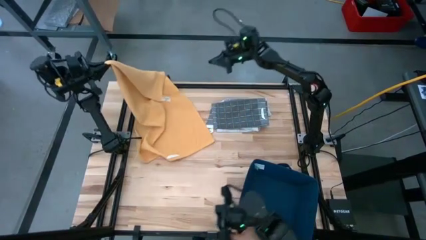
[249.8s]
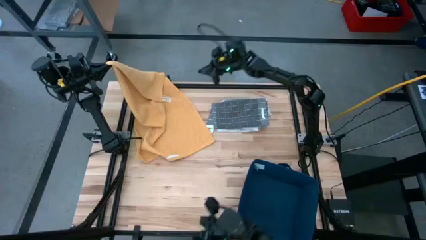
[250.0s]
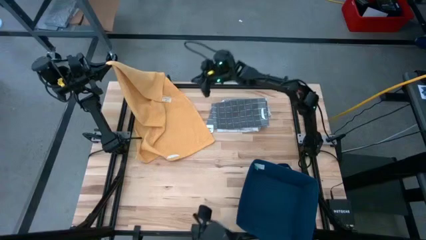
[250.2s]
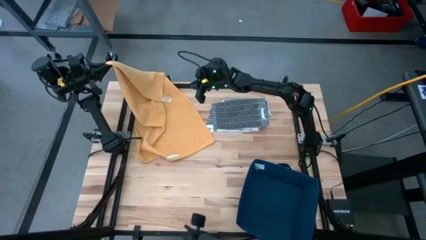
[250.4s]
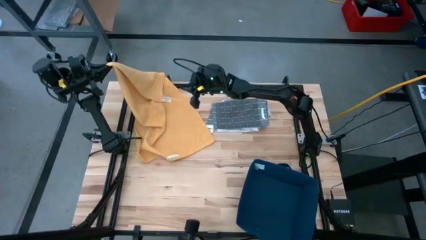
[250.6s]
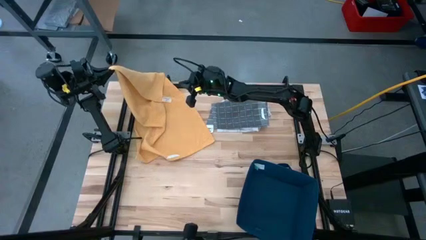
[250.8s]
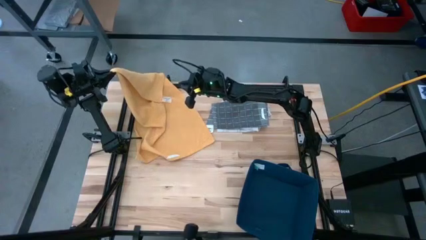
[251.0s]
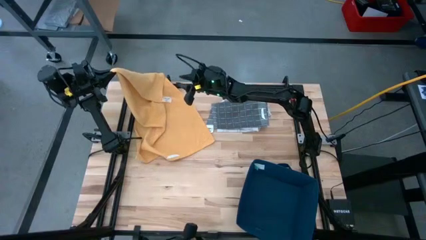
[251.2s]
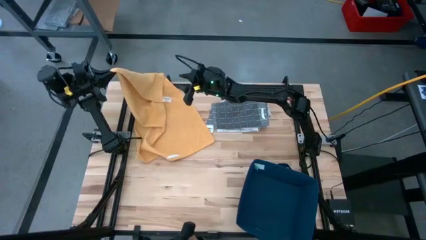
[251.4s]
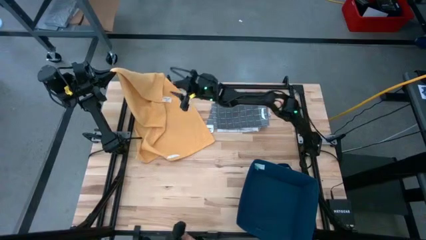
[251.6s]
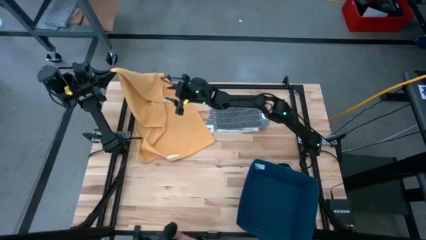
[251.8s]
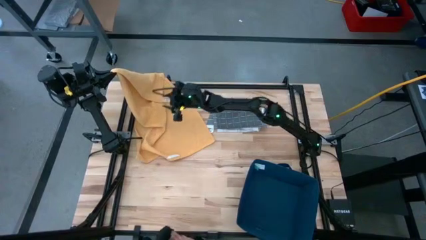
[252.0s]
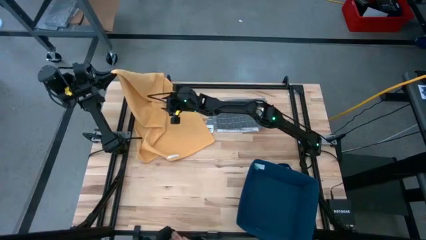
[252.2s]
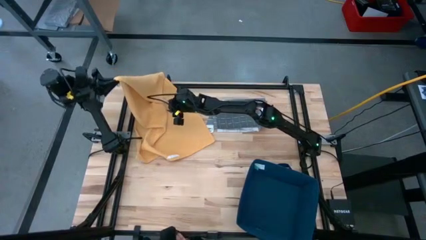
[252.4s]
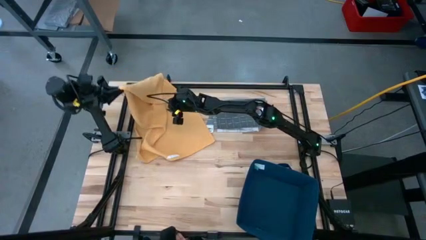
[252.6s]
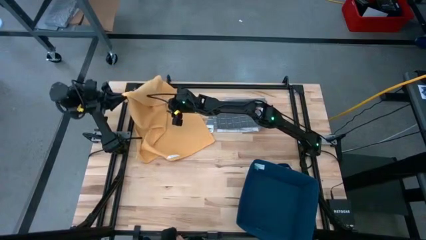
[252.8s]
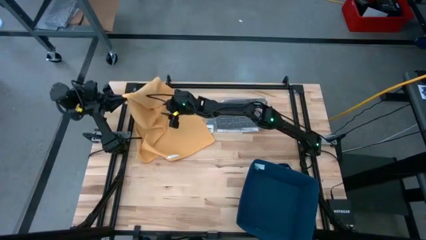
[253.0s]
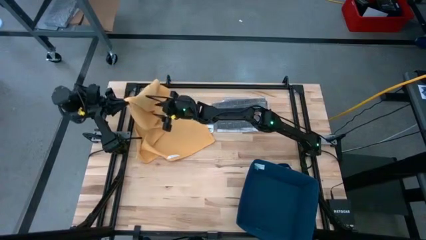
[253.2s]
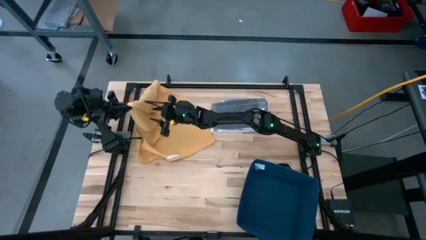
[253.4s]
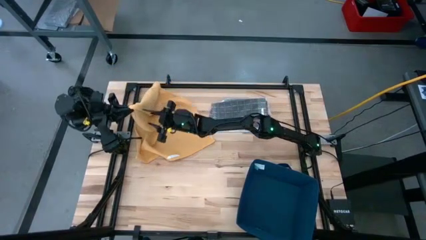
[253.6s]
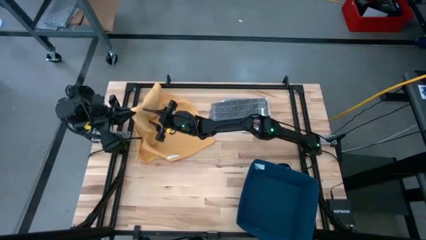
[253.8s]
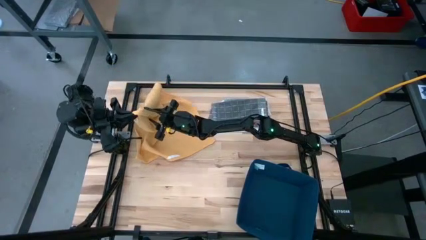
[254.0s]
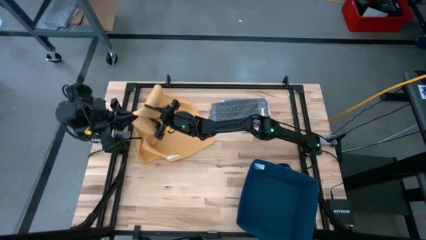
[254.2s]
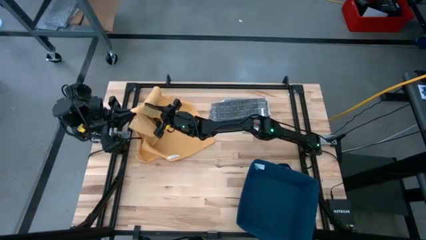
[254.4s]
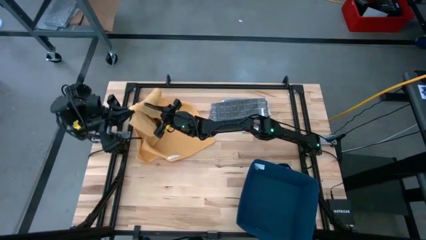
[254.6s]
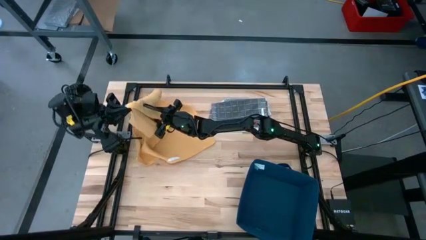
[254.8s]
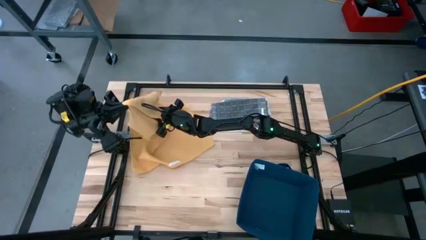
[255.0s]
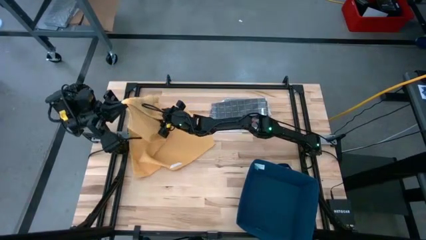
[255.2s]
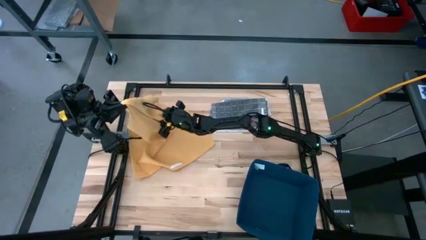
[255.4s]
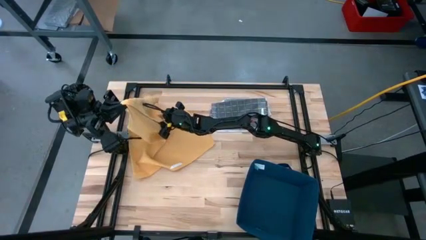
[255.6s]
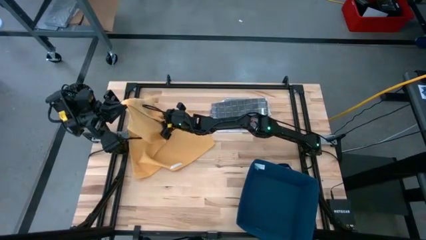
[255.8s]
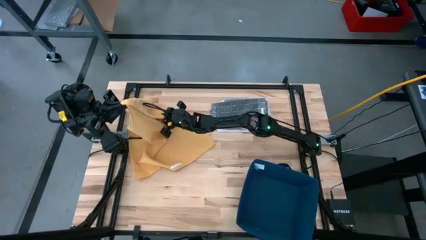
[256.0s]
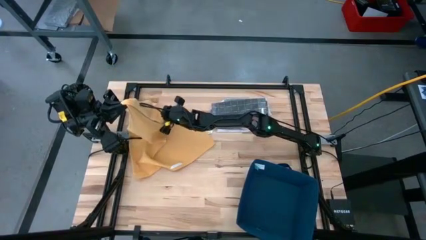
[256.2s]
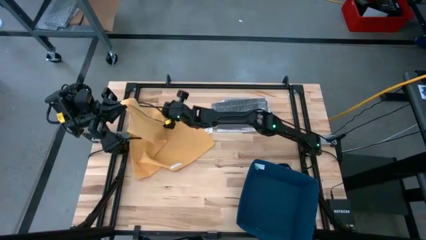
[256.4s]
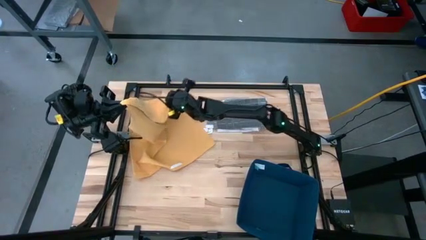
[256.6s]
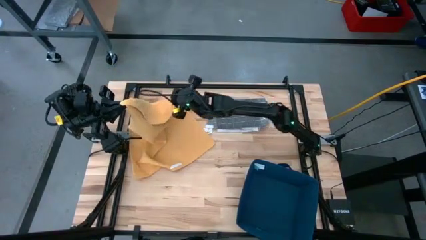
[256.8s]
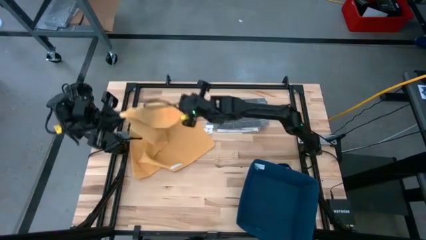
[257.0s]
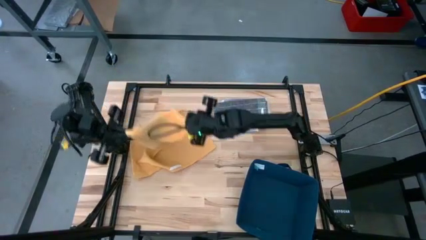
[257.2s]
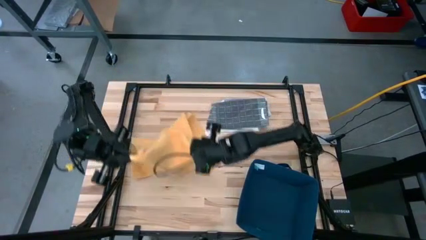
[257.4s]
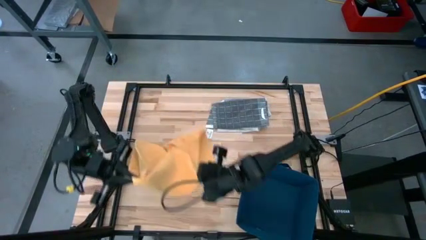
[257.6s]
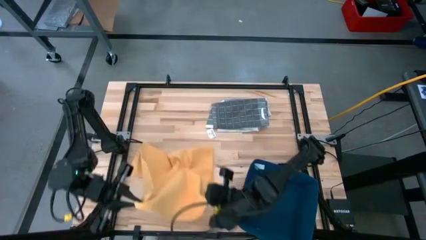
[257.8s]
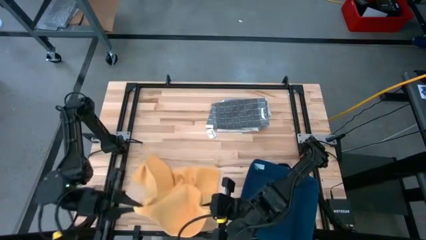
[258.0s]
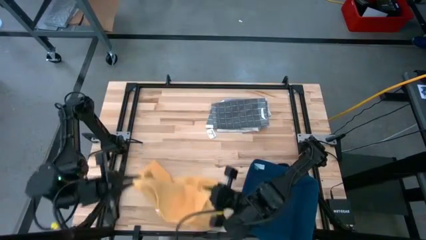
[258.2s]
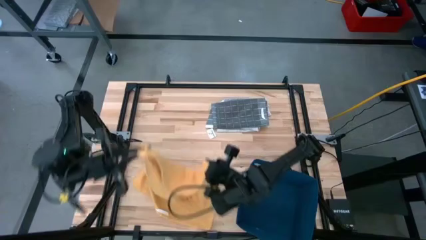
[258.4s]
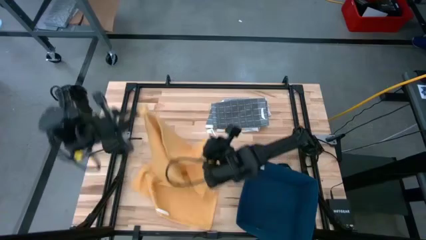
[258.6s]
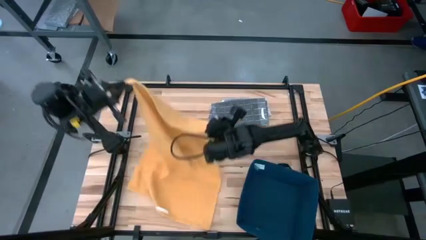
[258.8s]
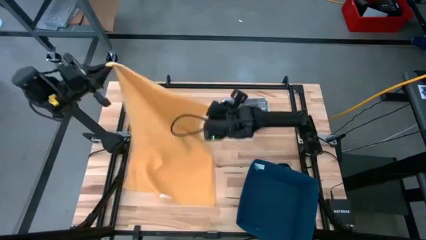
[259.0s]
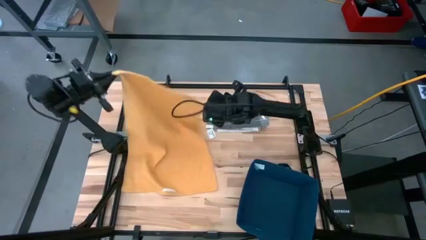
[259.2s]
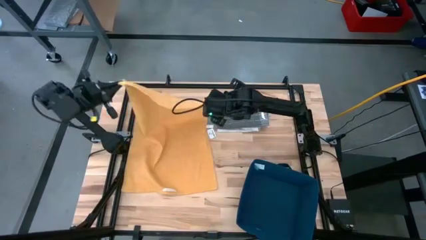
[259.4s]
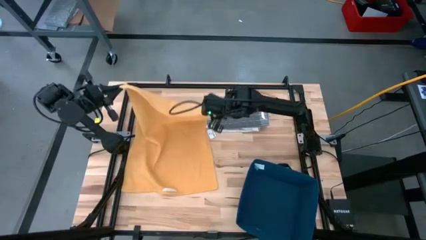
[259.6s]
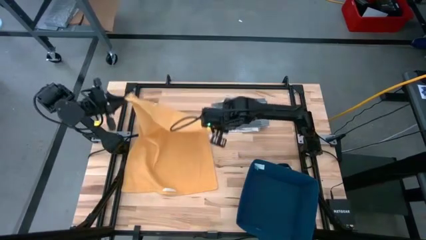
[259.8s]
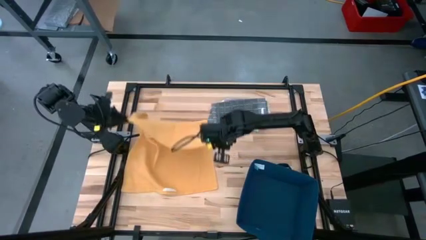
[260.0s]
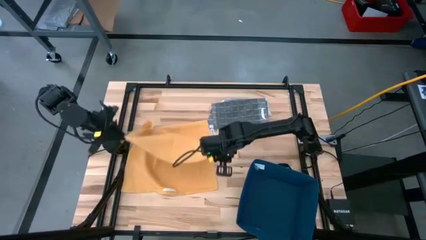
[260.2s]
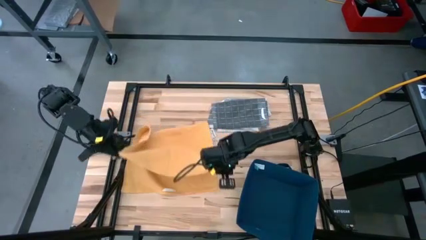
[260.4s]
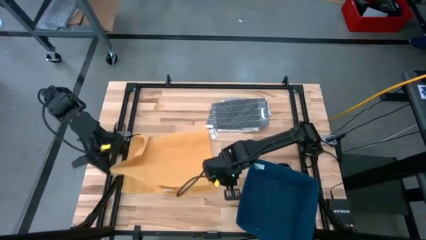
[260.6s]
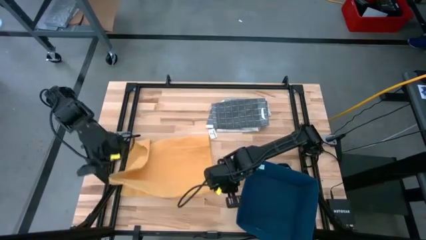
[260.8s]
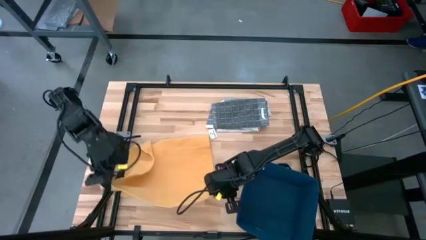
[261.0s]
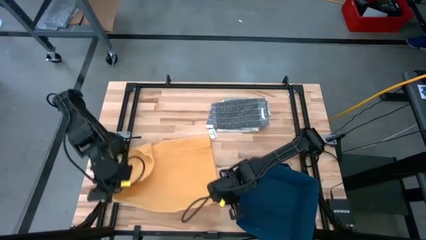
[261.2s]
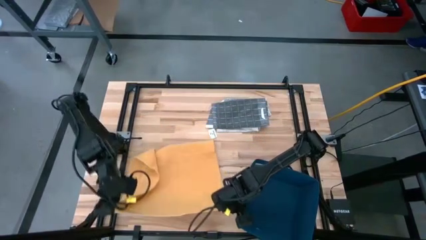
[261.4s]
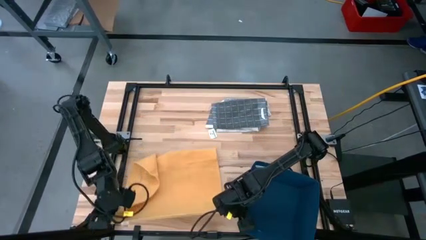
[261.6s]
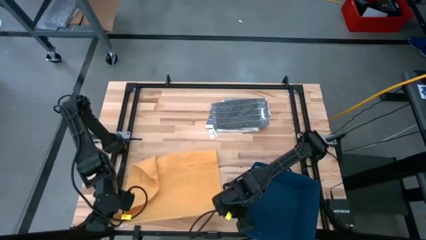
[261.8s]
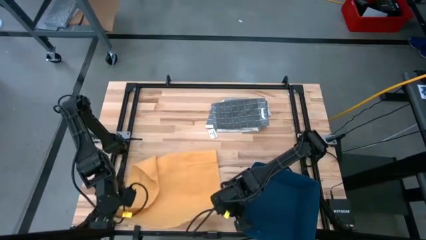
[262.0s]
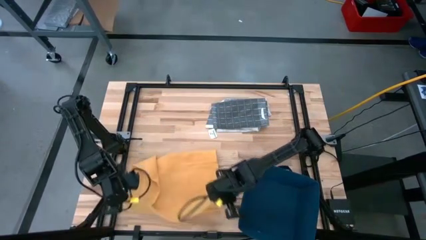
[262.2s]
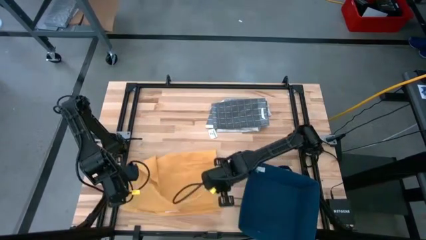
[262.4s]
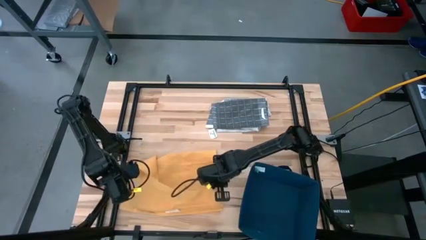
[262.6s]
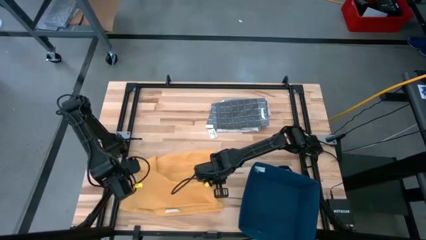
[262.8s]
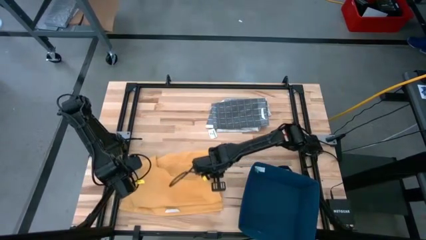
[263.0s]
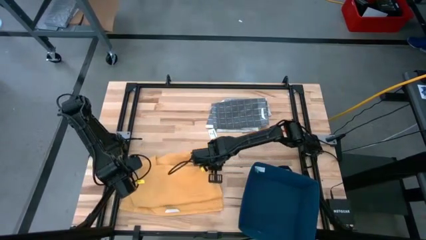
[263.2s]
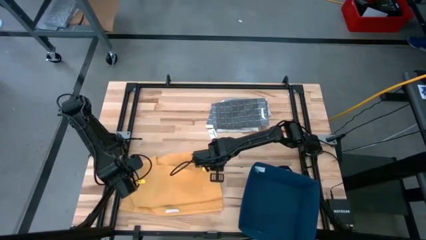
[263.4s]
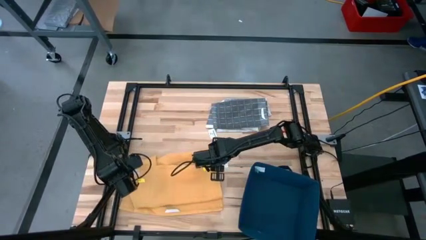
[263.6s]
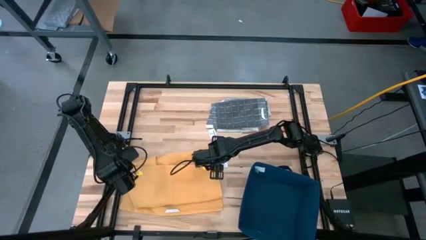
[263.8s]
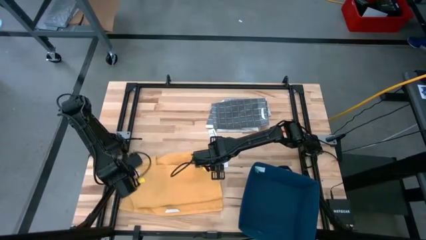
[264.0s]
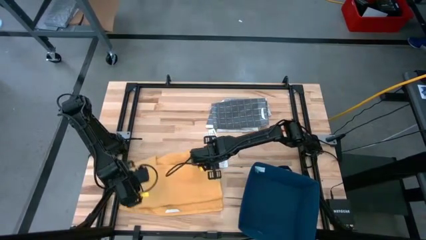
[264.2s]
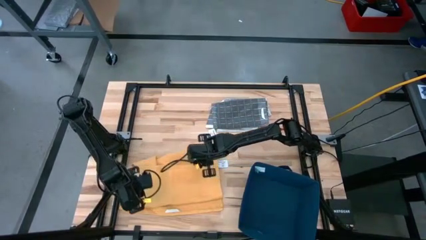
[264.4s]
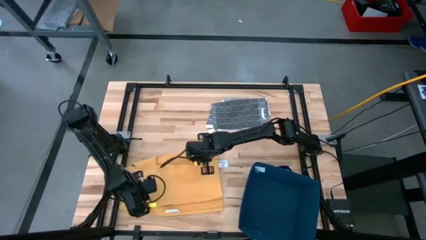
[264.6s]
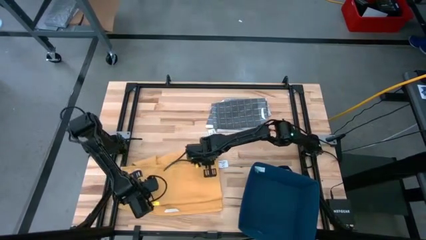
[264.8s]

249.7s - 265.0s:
Task: Fold towel
Fold the yellow kitchen towel
